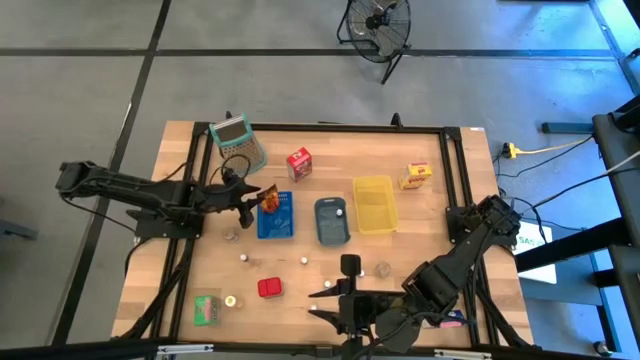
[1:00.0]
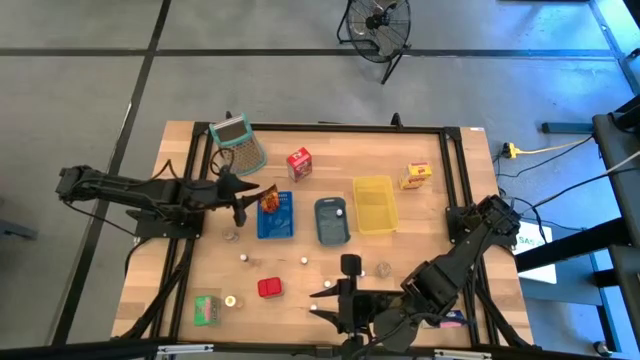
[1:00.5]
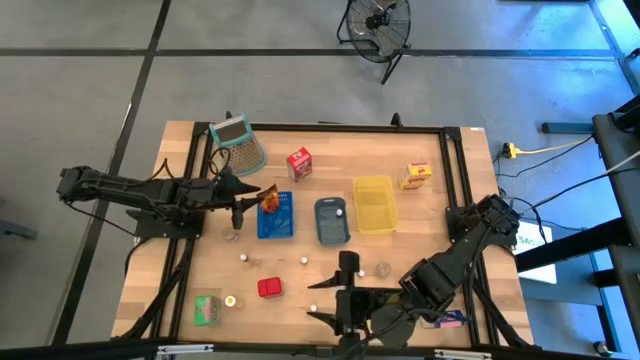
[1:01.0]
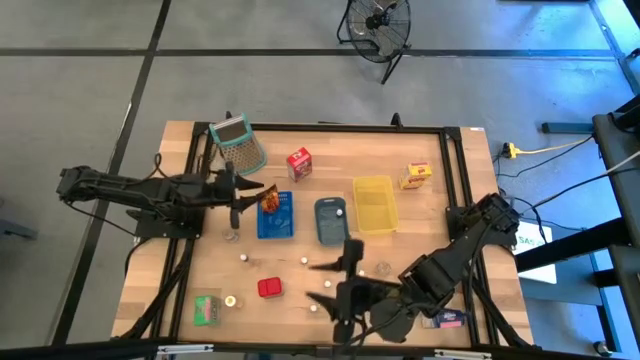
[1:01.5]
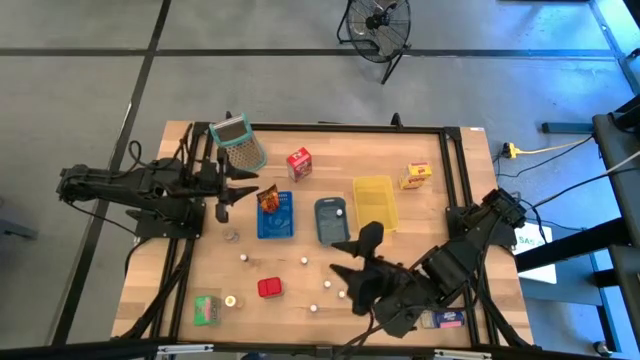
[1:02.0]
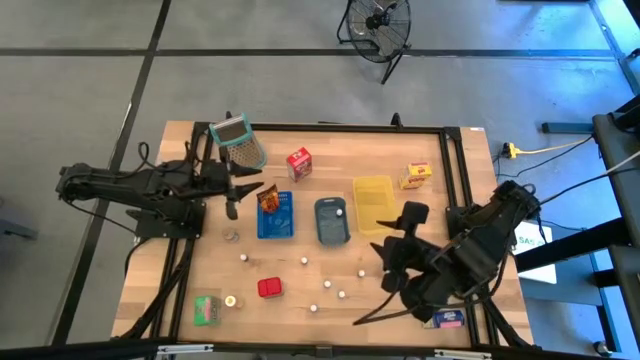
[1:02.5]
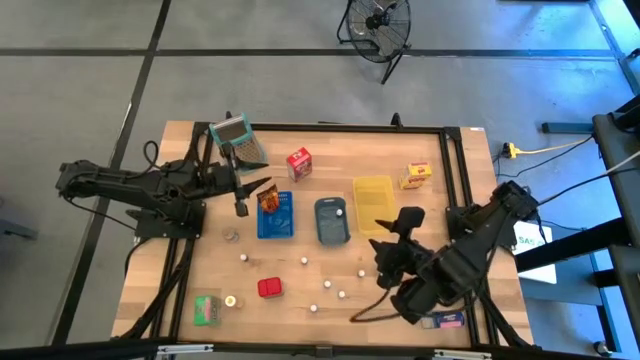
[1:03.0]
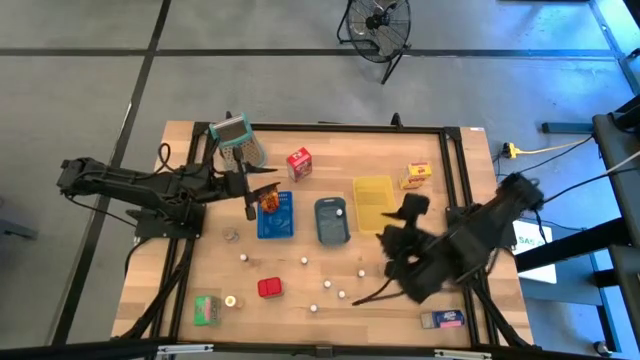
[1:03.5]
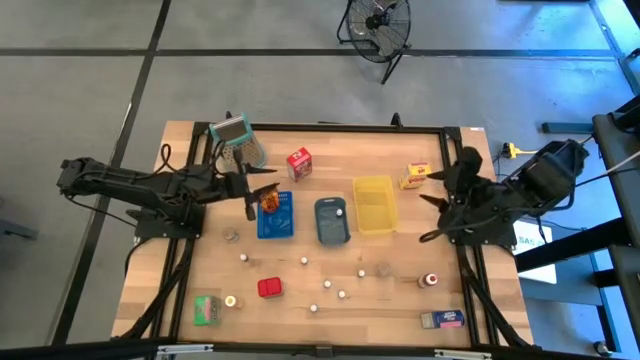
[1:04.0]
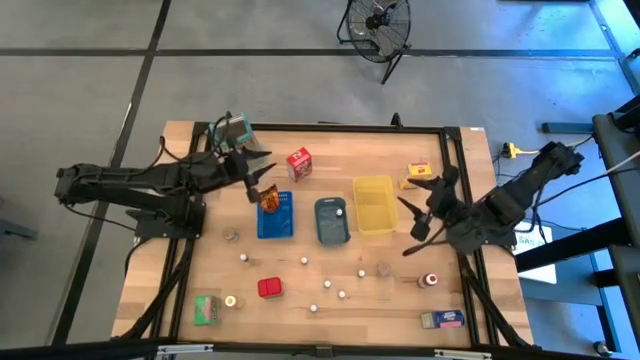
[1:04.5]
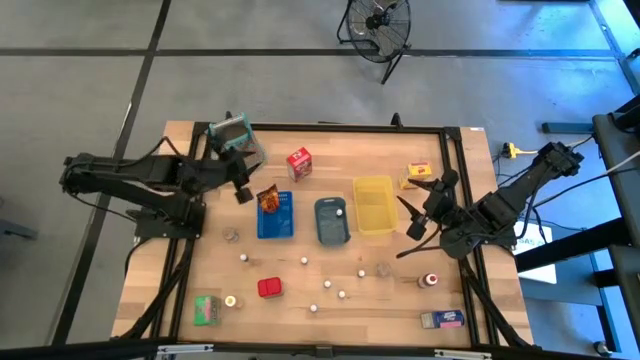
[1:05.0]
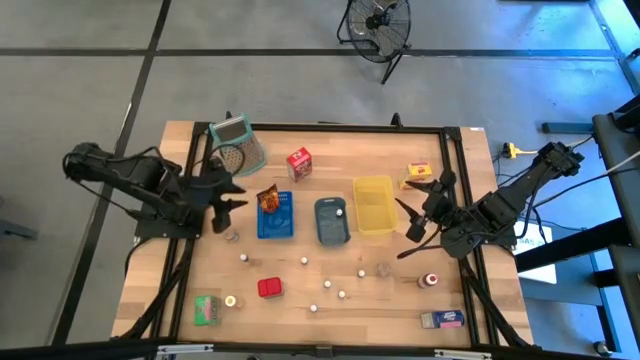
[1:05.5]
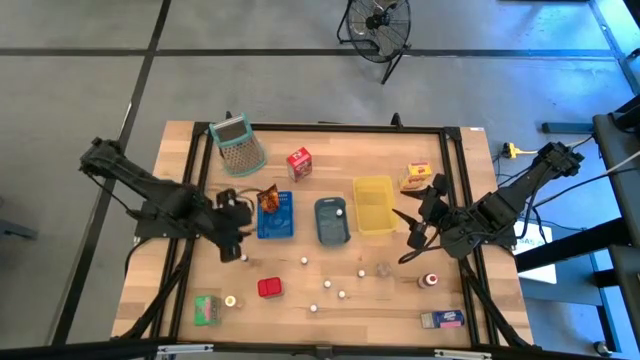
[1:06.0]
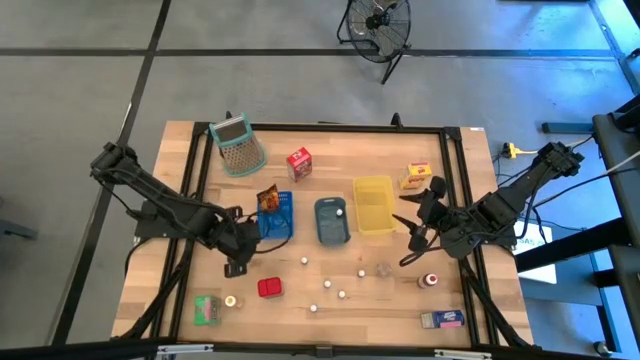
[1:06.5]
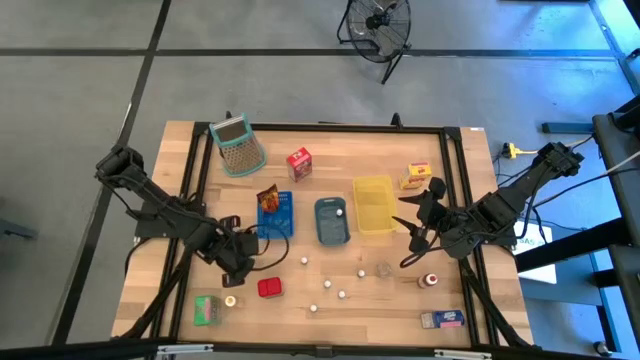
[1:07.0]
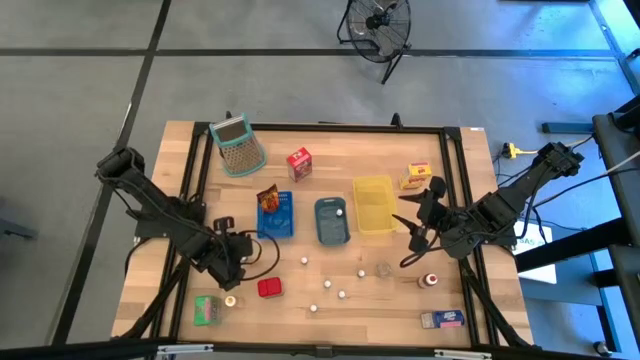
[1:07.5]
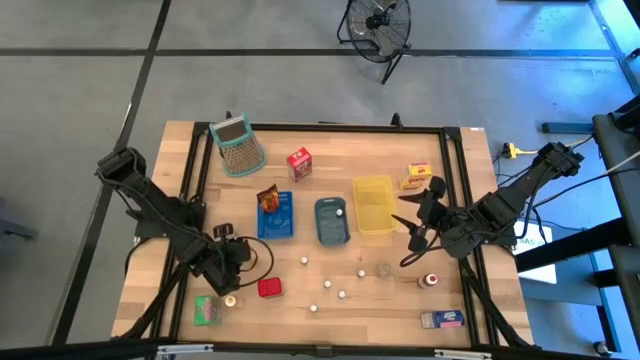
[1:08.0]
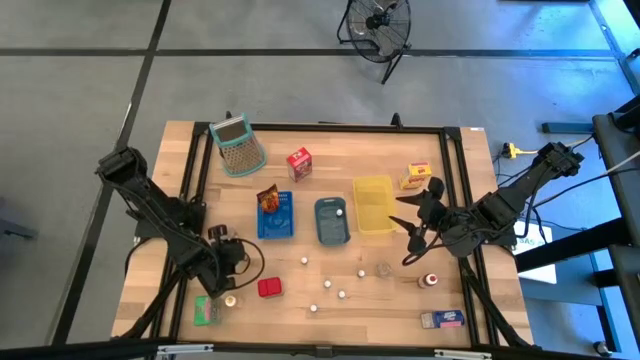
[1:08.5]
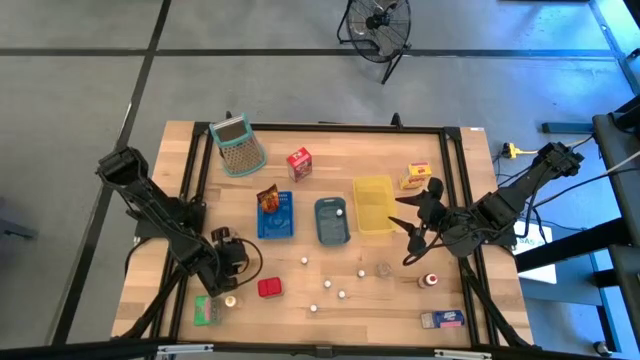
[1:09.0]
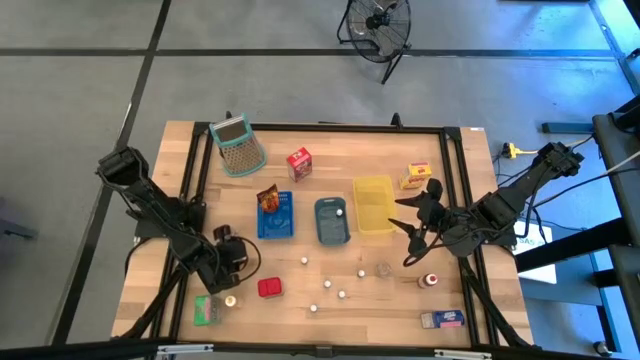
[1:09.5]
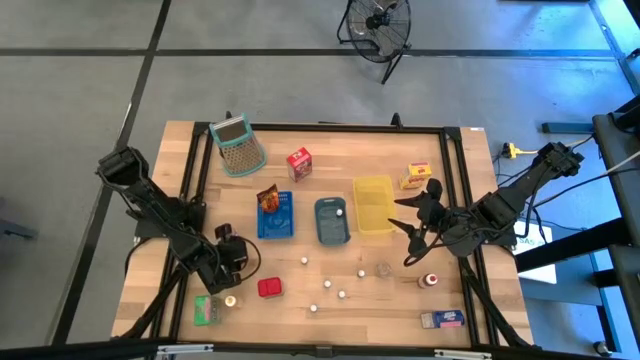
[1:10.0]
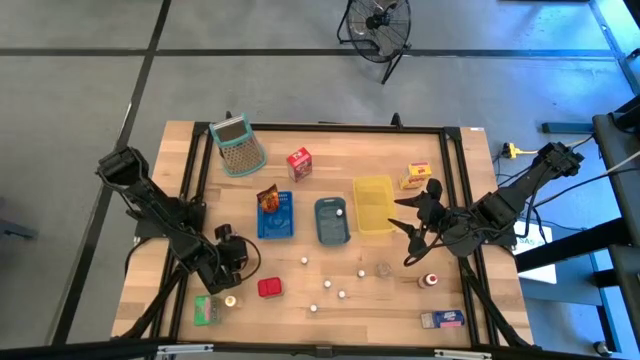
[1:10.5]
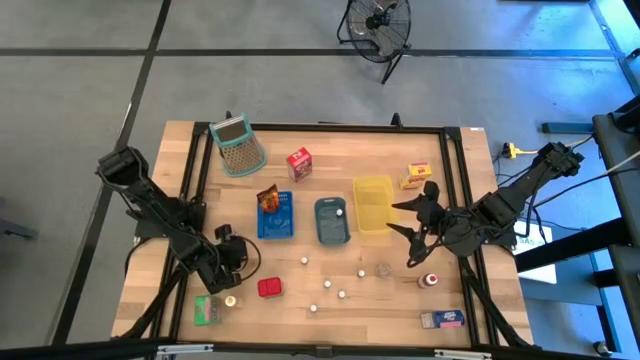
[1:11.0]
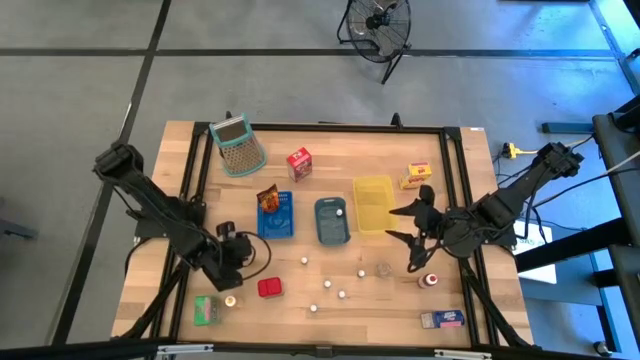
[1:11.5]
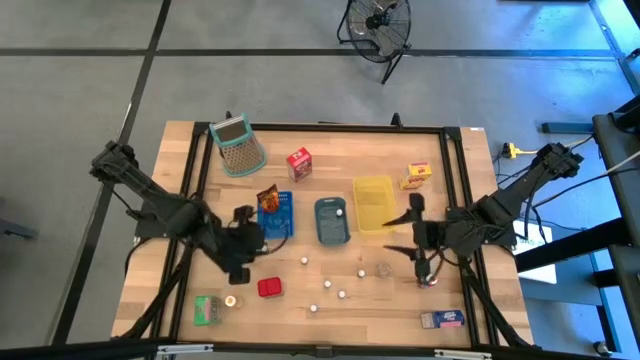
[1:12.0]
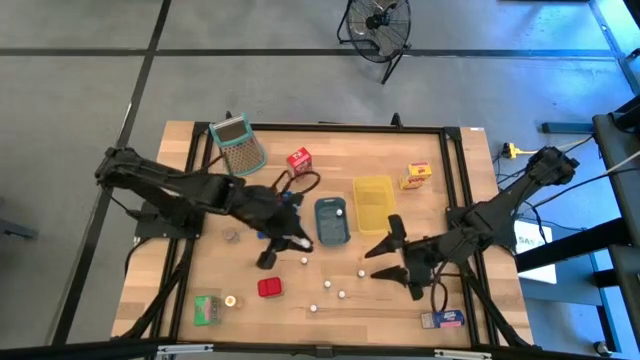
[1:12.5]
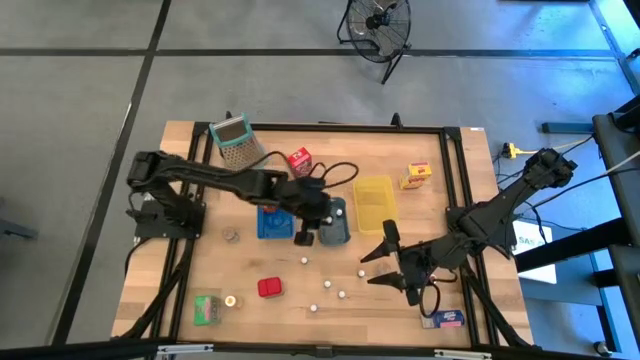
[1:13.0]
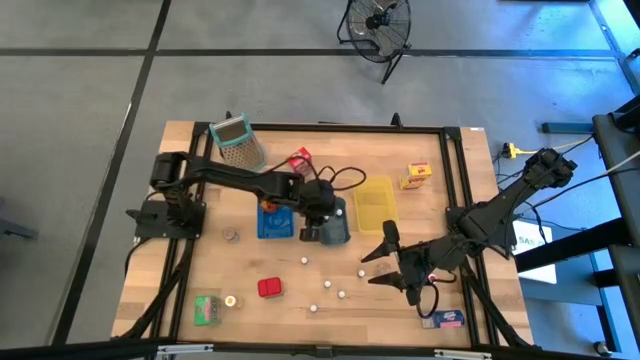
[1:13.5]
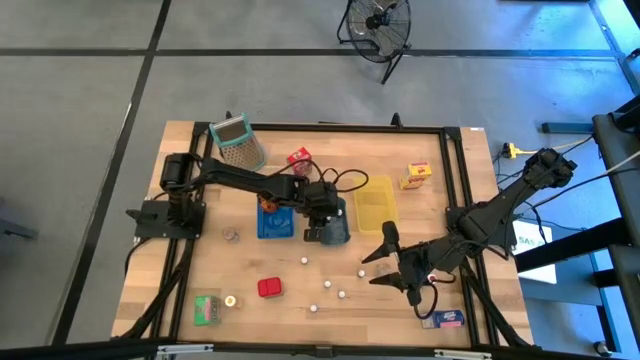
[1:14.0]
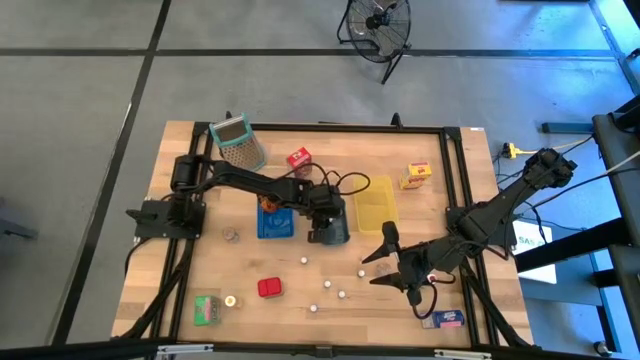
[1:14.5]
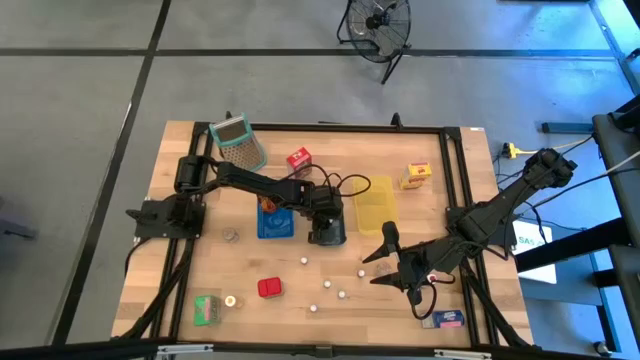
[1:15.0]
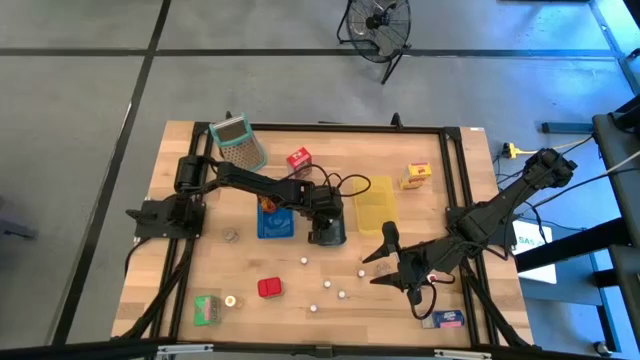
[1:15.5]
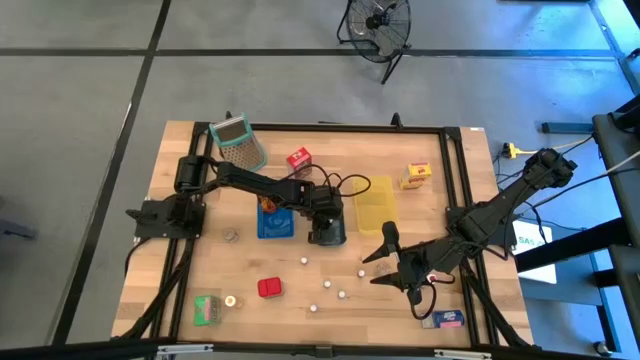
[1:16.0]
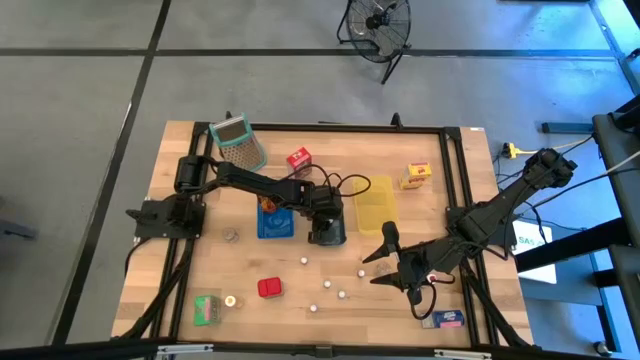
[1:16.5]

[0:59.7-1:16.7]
Task: Pick & Place Kitchen Items
Put the small food coloring bottle into the gray bin

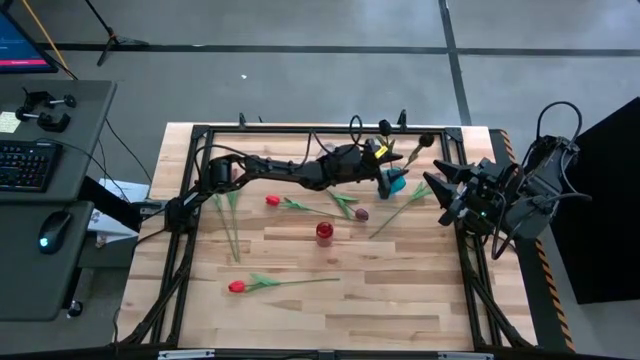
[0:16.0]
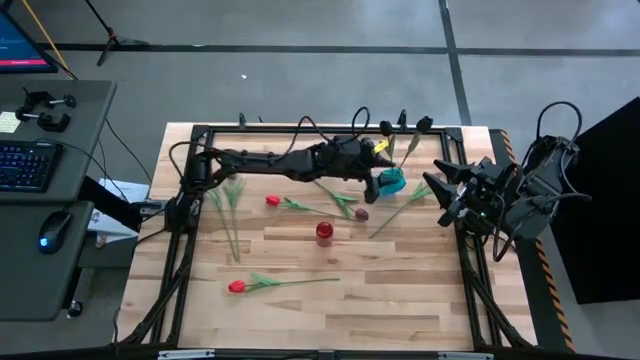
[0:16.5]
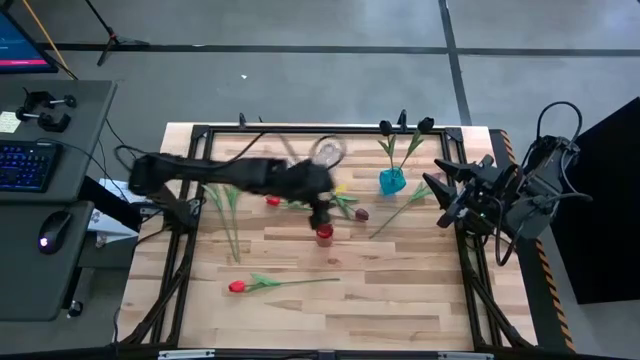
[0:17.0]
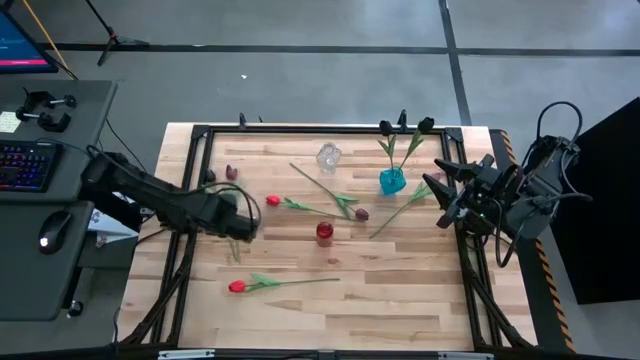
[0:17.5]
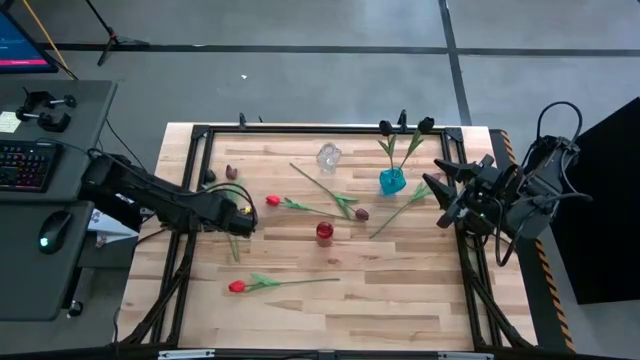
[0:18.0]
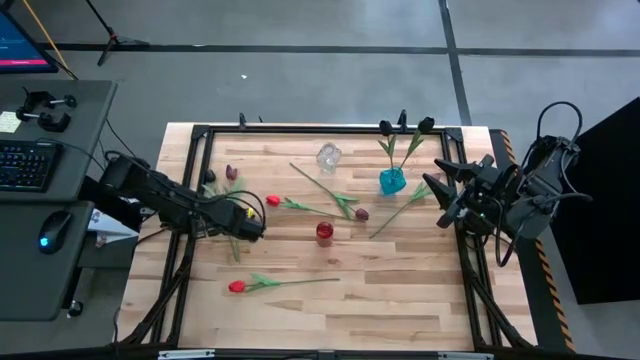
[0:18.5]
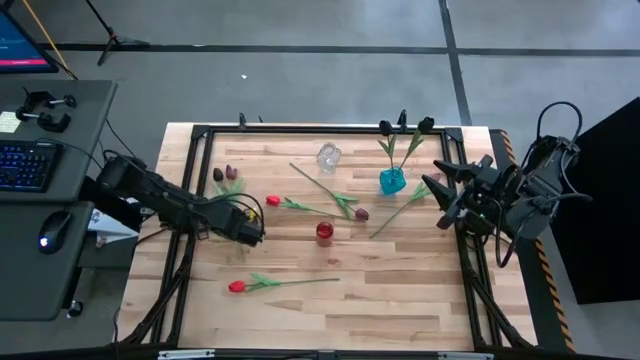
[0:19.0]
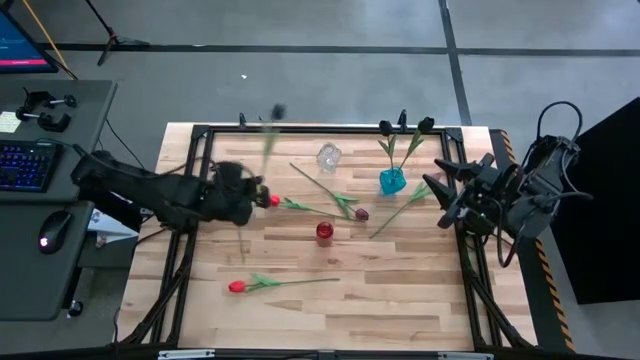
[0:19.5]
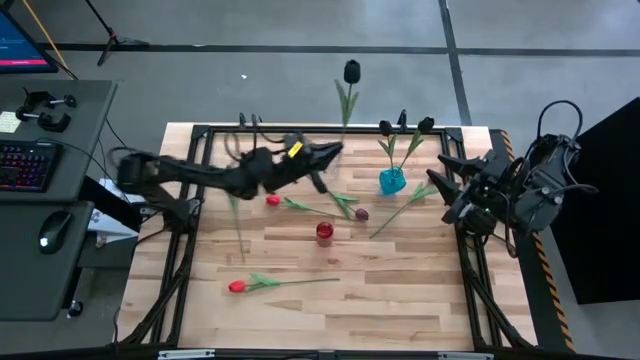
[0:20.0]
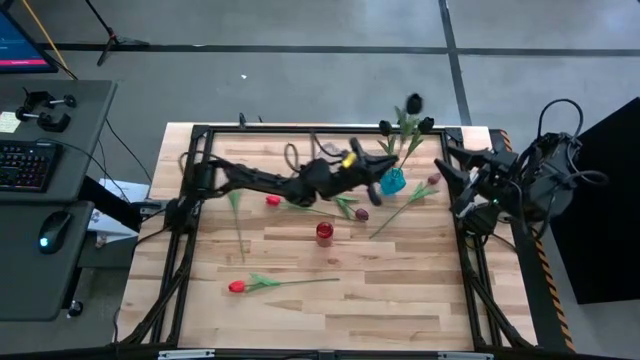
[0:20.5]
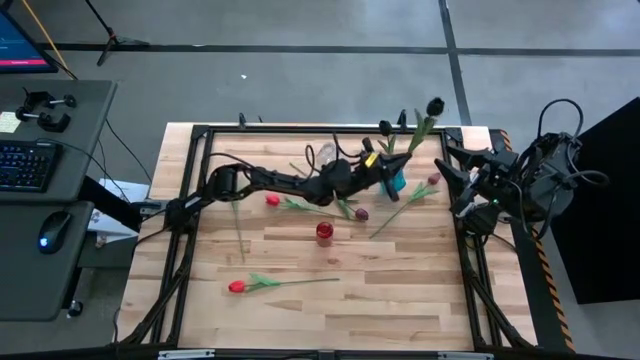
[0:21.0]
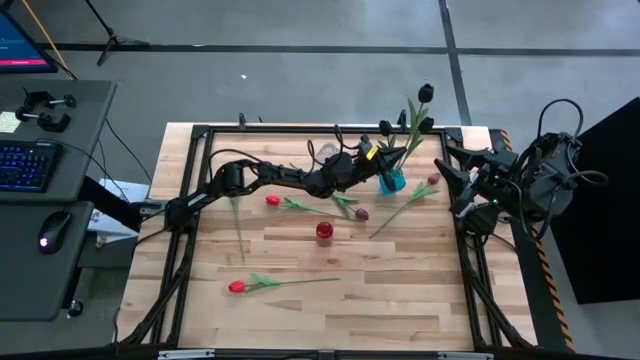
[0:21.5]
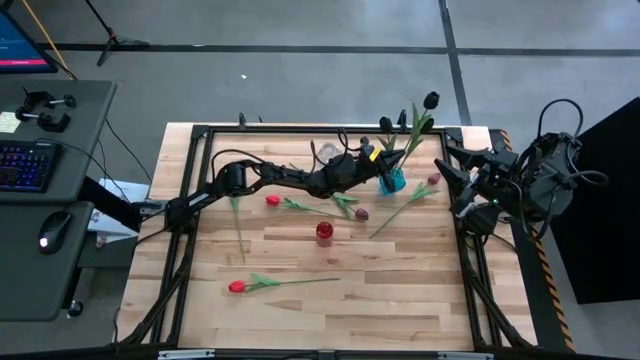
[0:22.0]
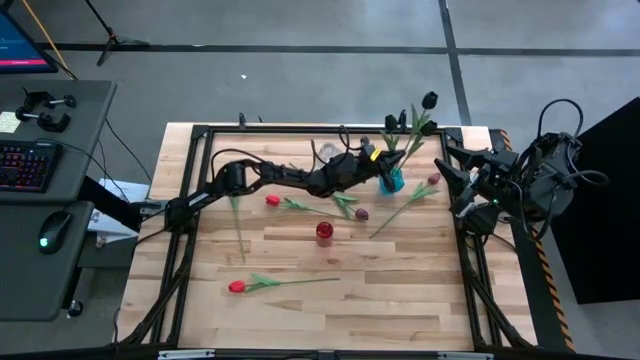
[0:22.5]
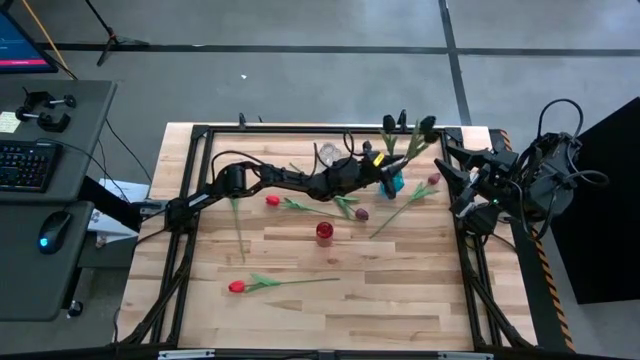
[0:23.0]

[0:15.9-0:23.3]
Task: Sort flowers into vase by color
Put the black flower into the blue vase
